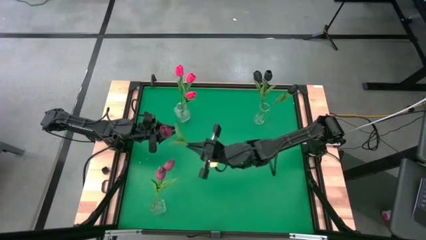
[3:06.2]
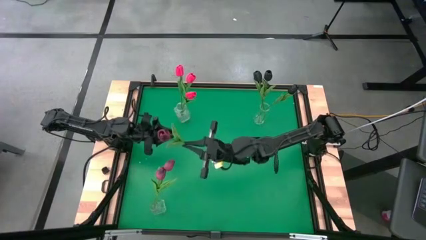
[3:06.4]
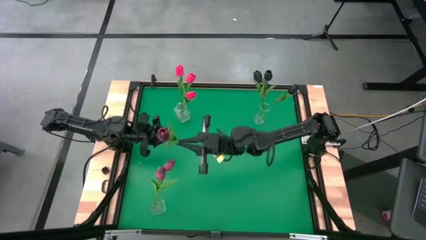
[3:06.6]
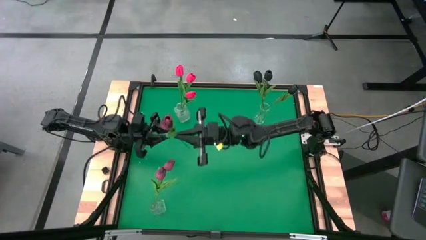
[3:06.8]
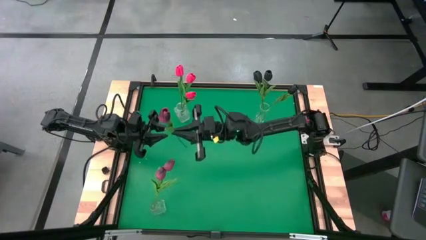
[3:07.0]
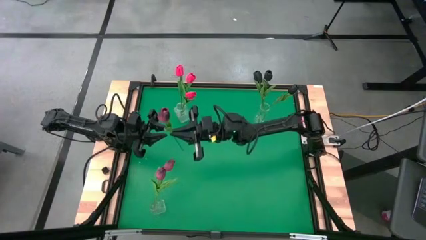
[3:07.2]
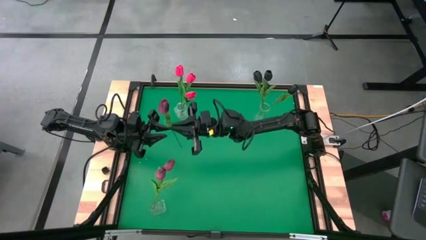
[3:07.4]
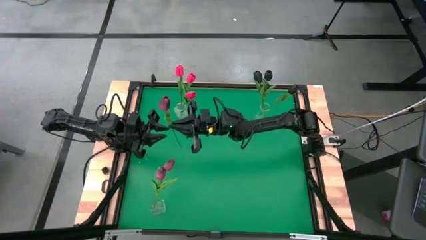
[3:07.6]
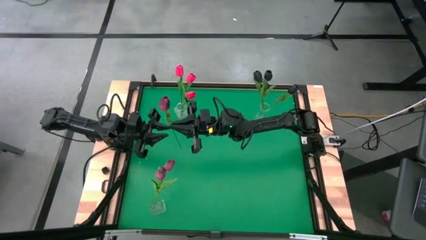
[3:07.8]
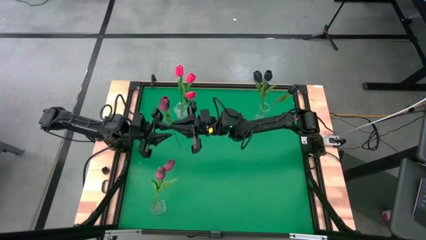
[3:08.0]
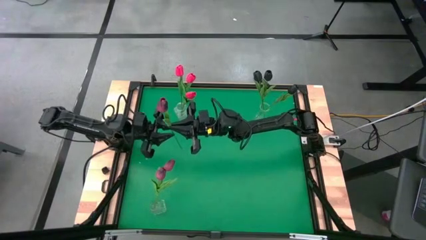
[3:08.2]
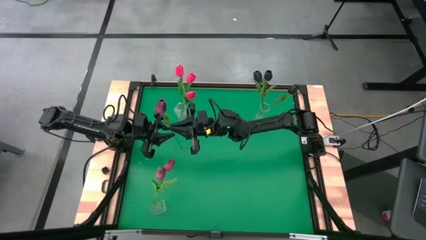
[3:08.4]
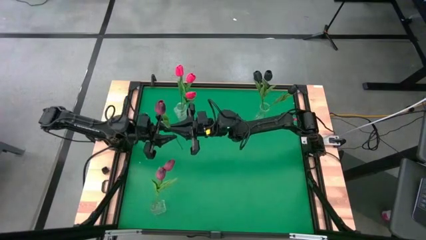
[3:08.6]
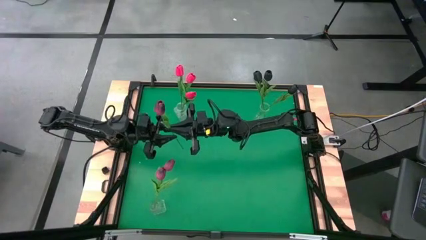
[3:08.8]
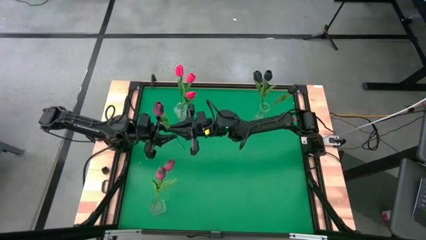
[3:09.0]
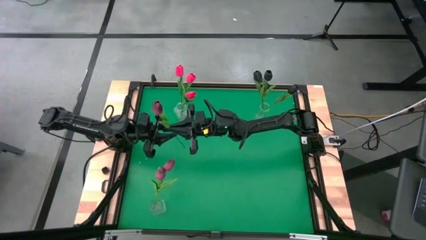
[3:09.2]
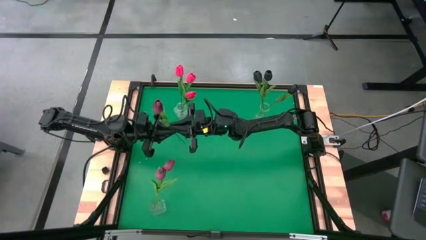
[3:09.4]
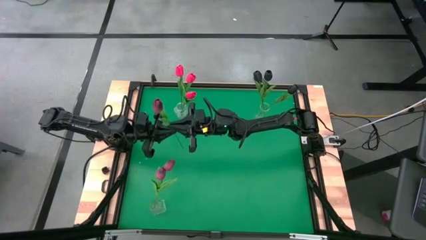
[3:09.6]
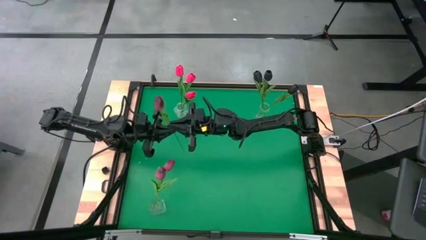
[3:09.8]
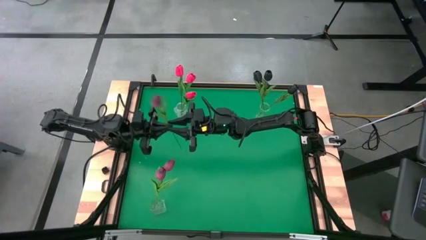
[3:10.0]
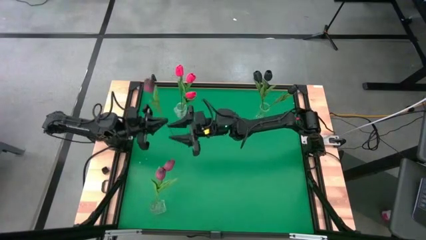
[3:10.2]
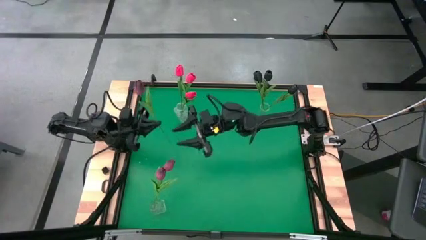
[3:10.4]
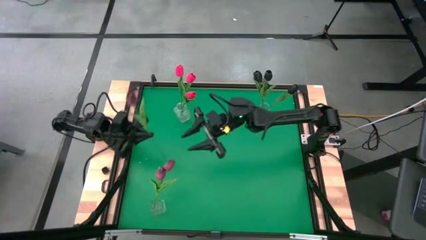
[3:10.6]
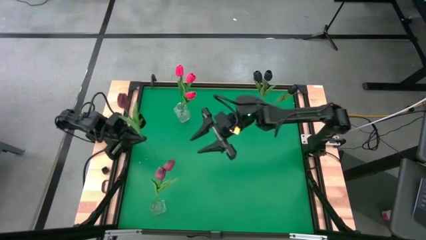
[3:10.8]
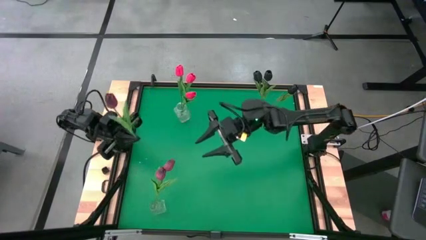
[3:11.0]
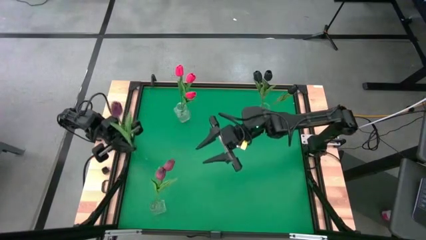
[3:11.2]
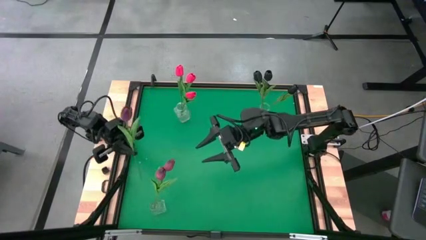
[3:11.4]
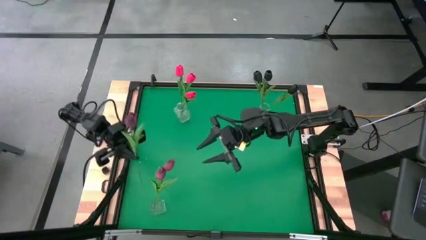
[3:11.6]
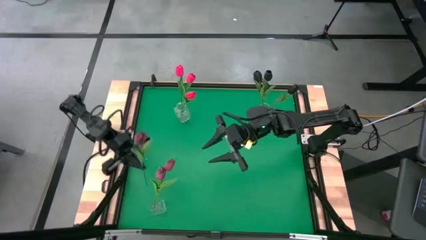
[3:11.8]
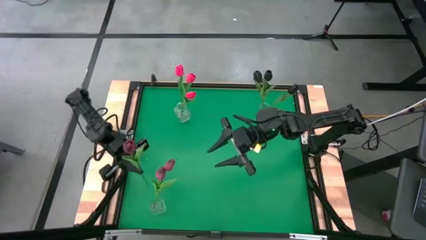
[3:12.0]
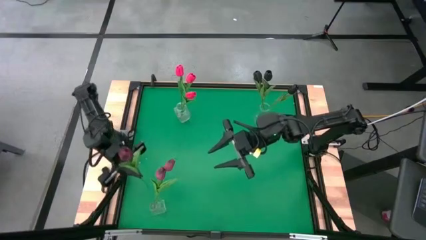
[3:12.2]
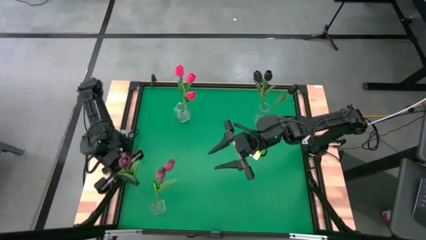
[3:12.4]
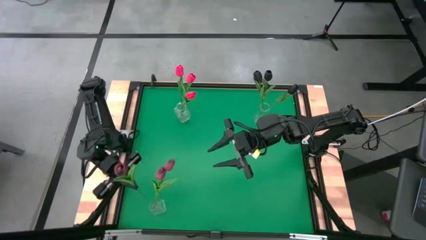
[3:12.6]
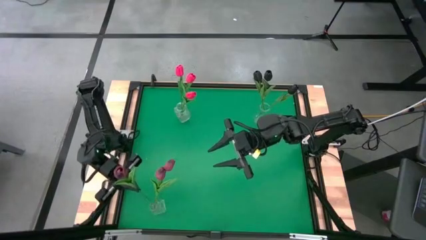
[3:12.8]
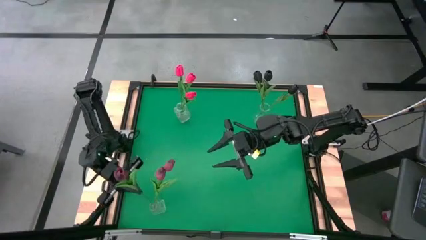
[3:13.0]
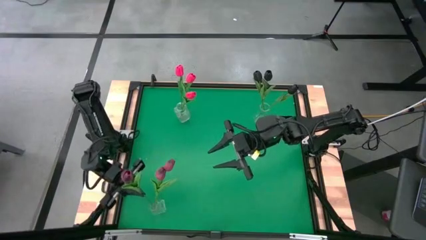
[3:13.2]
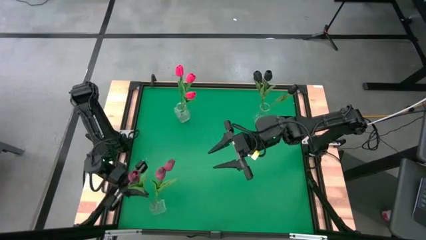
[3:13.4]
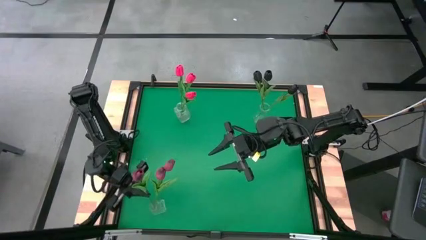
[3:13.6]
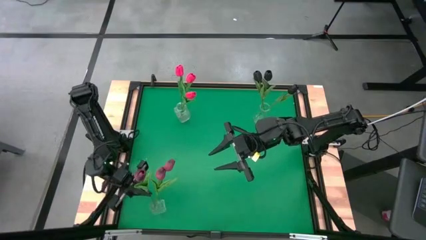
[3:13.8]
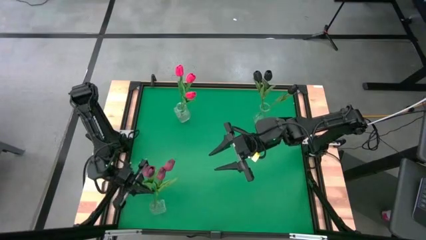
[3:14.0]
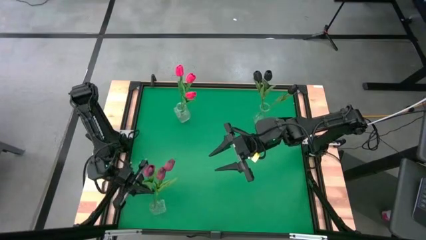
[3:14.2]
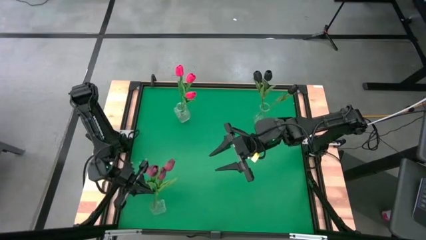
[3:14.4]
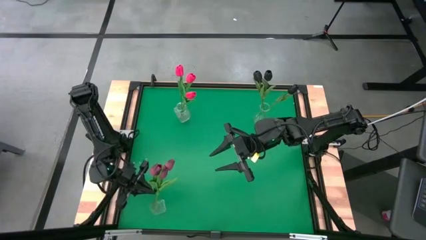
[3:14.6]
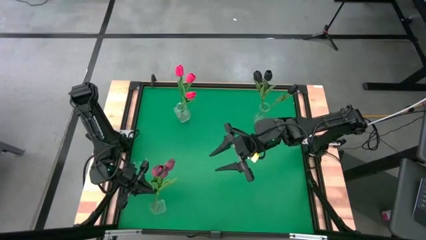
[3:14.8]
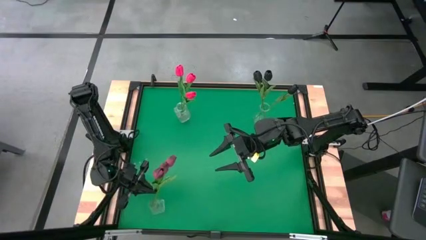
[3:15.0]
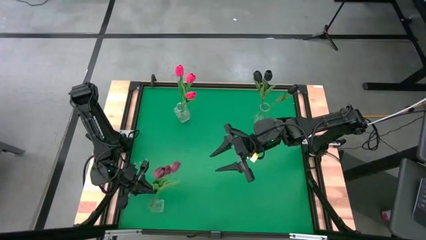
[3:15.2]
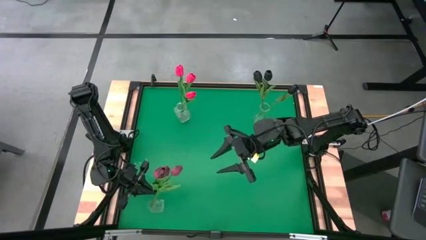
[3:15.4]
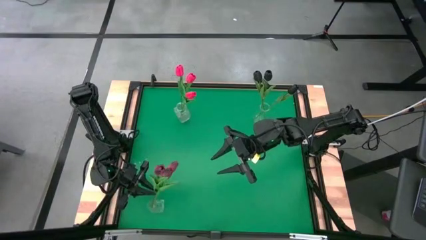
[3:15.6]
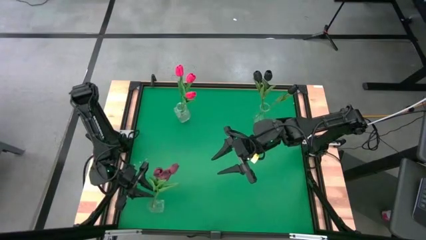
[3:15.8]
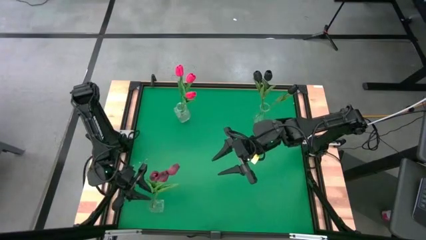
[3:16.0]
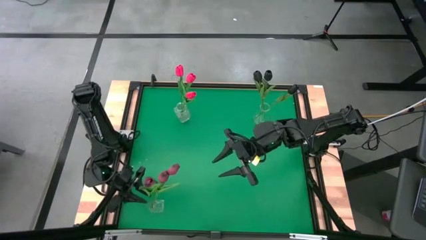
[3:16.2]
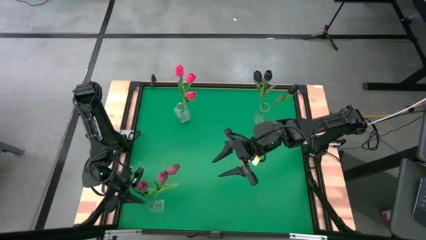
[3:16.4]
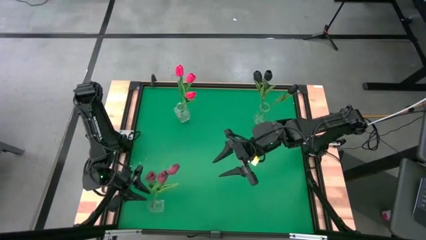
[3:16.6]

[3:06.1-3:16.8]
Task: Sort flowers into vase by color
Put the dark red flower into the bottom transparent flower vase
